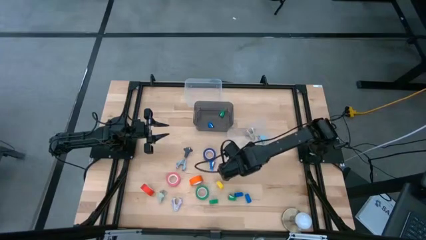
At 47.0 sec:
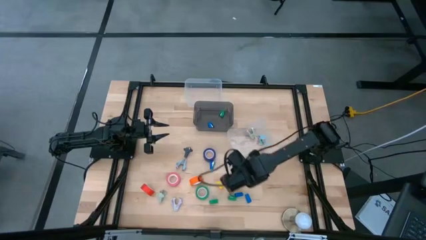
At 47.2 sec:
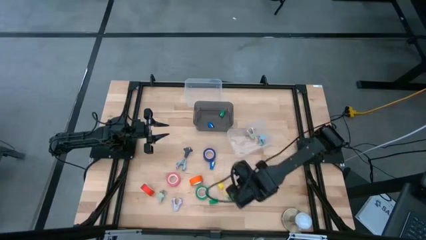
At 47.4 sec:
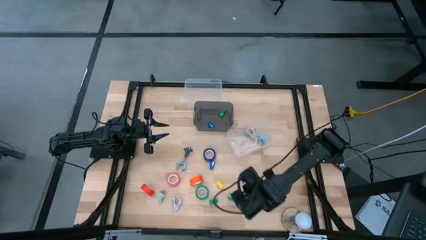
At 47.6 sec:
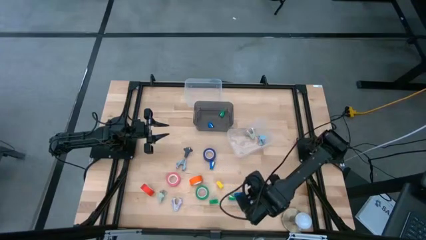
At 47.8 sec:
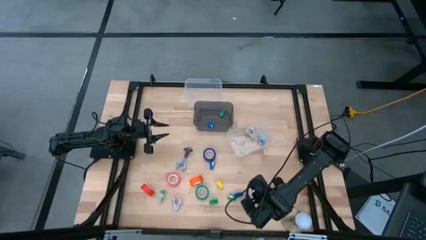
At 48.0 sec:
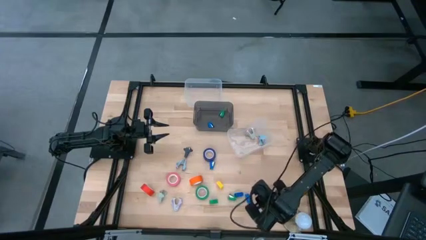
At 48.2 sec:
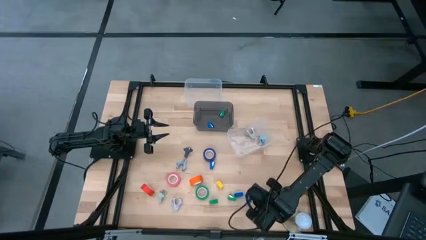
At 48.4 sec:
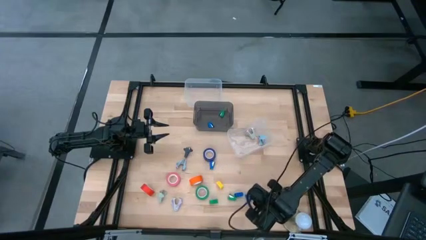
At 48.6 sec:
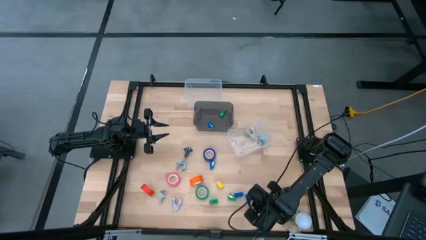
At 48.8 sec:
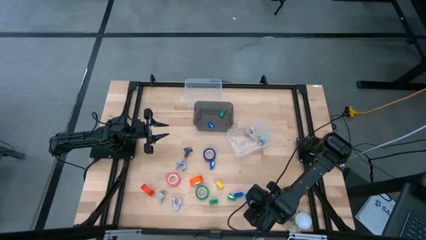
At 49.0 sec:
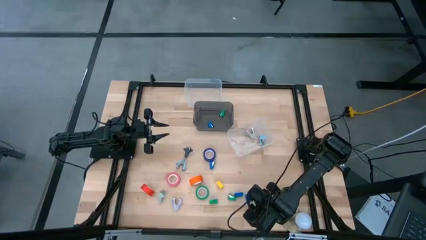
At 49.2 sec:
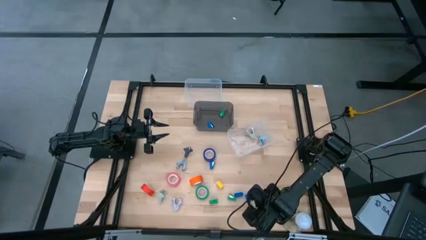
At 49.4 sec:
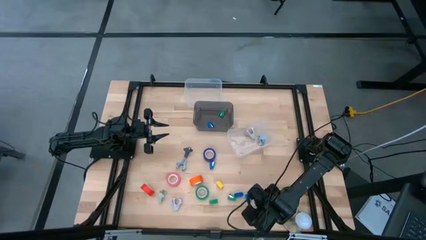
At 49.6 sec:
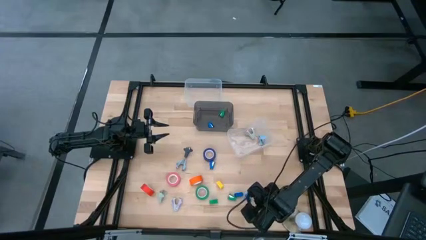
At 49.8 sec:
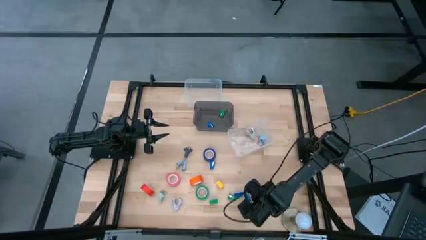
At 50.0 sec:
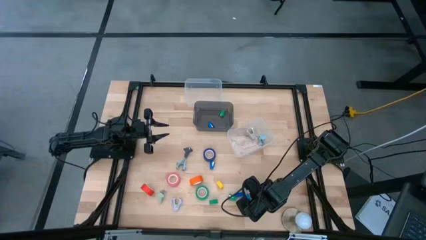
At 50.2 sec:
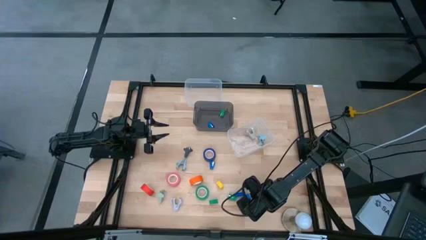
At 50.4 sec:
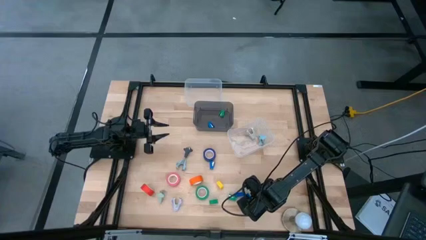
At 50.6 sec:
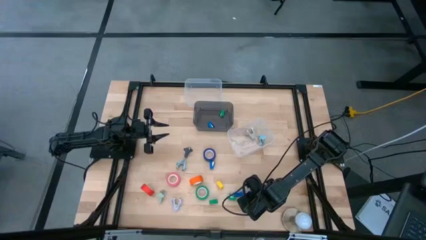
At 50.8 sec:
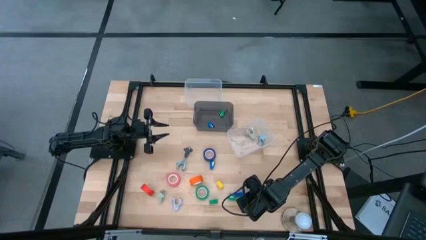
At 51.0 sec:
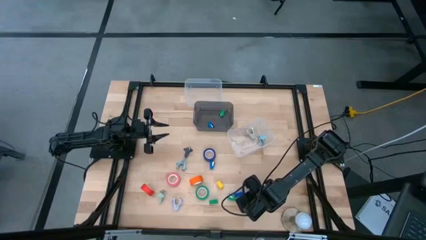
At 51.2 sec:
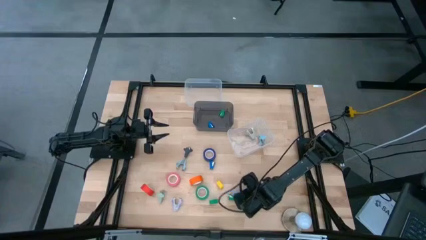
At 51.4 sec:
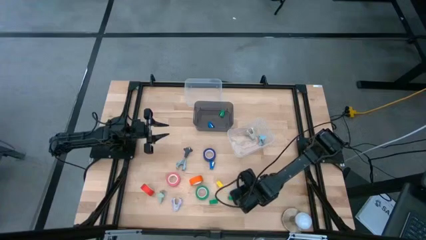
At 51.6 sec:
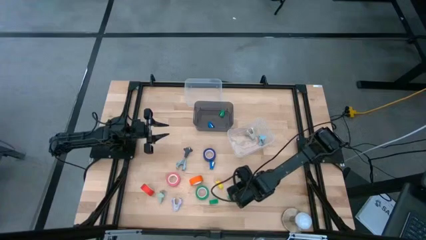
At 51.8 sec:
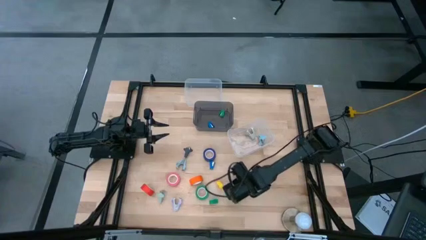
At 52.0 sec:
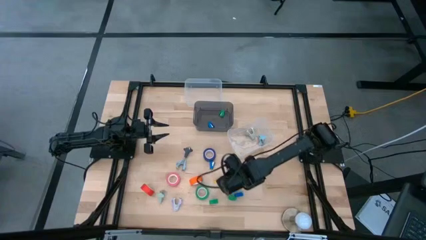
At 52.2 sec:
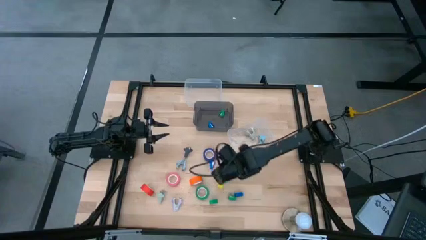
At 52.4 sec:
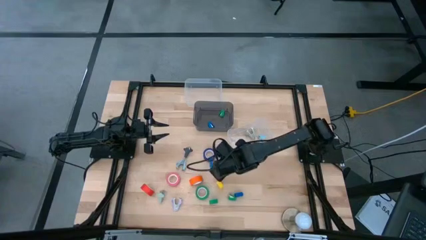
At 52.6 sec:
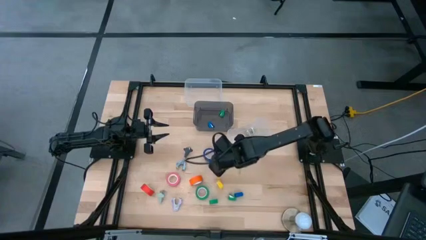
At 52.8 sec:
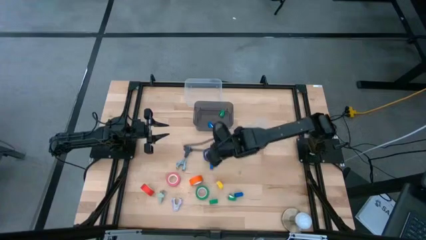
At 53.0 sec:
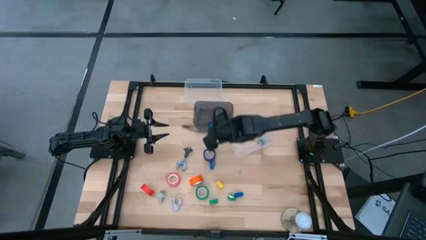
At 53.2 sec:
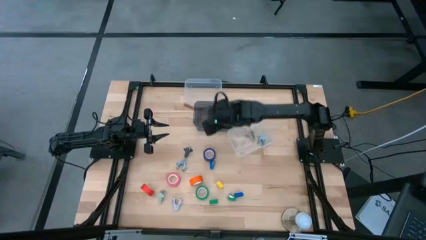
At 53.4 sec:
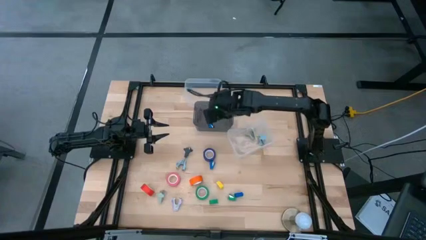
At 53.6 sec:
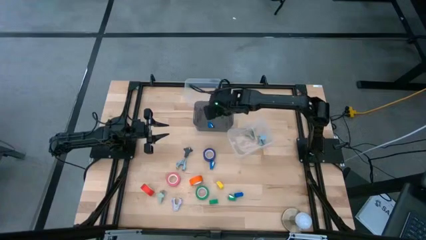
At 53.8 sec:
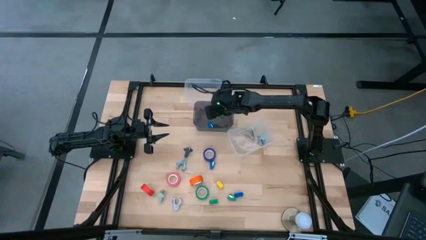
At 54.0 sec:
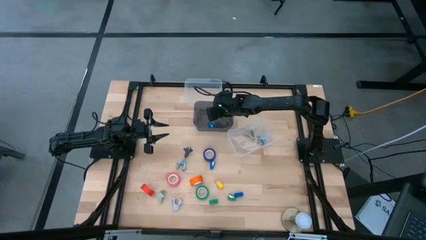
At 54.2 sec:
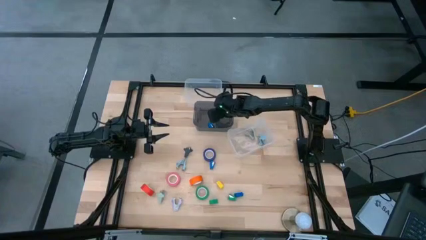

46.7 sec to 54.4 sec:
Task: Pick and place Stapler, Stapler remover, tape
Put the blue stapler into the black bin

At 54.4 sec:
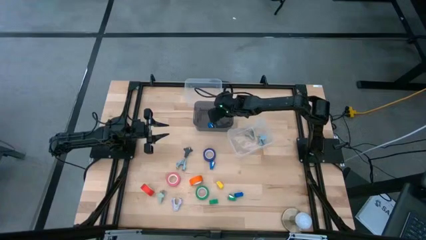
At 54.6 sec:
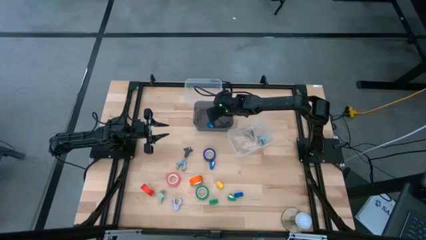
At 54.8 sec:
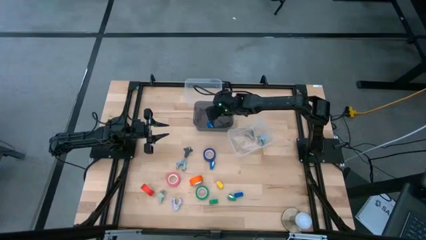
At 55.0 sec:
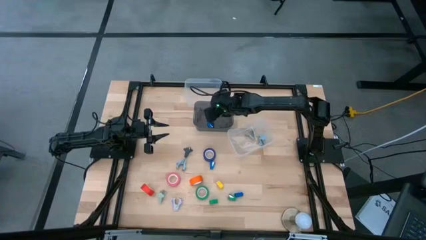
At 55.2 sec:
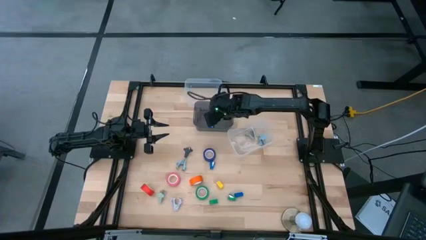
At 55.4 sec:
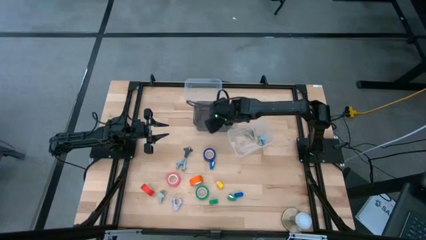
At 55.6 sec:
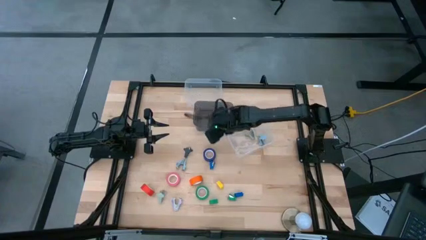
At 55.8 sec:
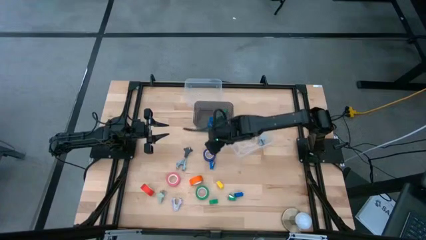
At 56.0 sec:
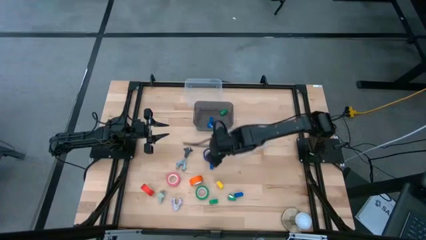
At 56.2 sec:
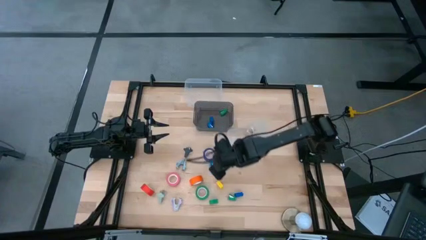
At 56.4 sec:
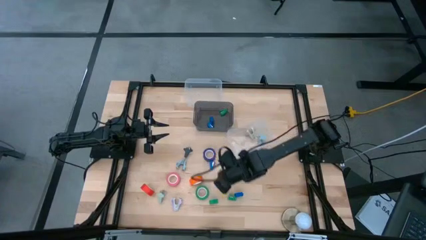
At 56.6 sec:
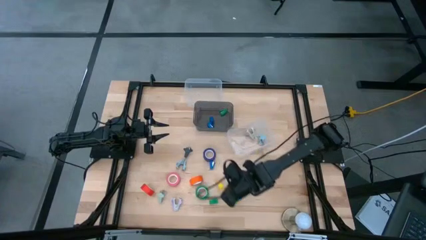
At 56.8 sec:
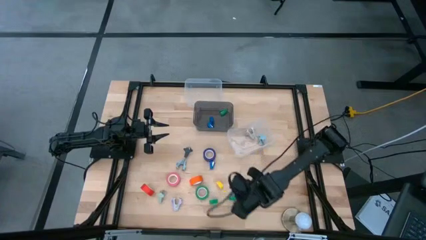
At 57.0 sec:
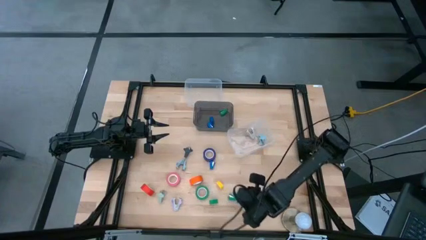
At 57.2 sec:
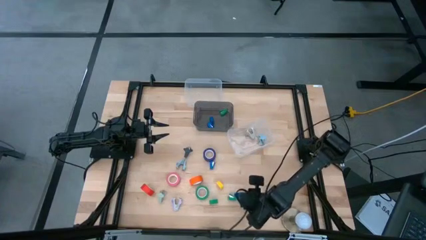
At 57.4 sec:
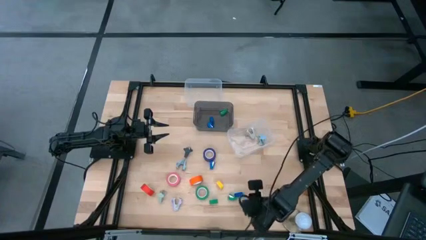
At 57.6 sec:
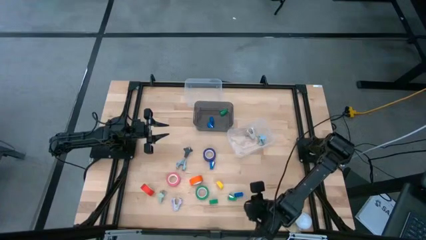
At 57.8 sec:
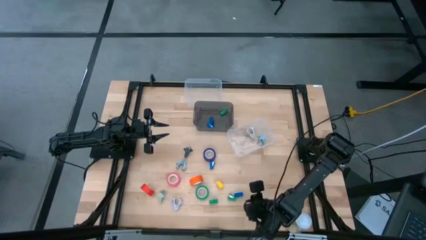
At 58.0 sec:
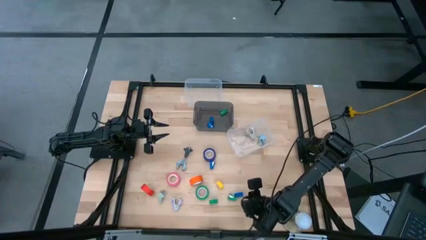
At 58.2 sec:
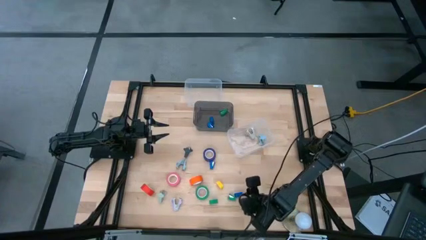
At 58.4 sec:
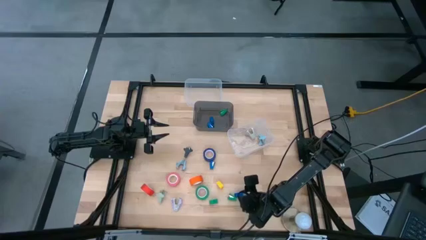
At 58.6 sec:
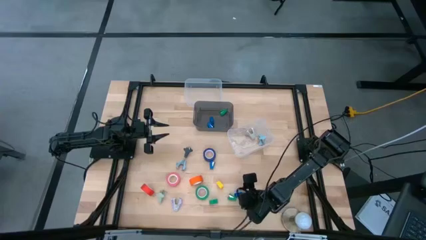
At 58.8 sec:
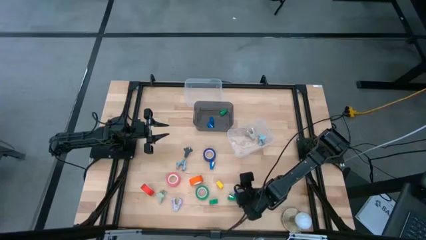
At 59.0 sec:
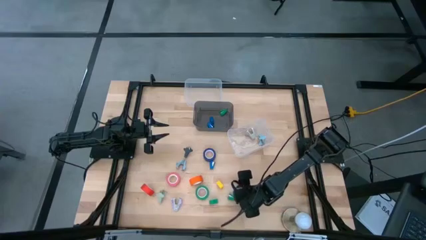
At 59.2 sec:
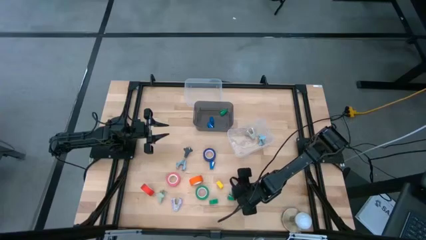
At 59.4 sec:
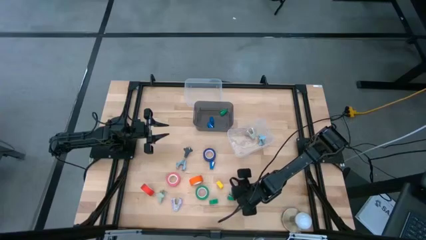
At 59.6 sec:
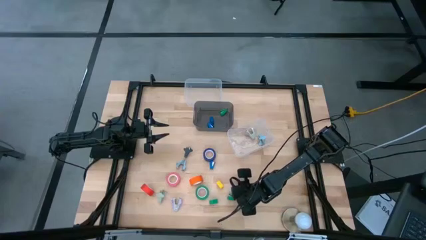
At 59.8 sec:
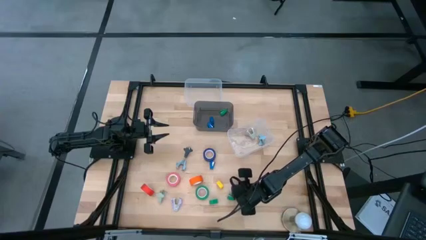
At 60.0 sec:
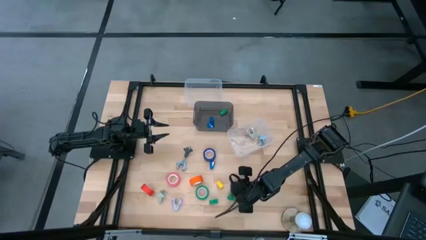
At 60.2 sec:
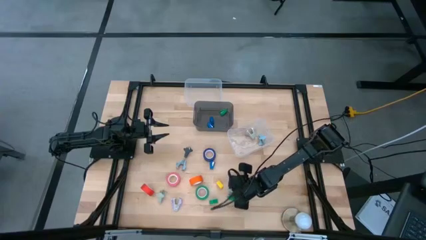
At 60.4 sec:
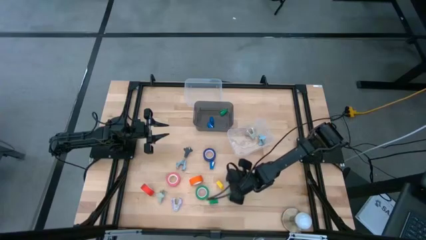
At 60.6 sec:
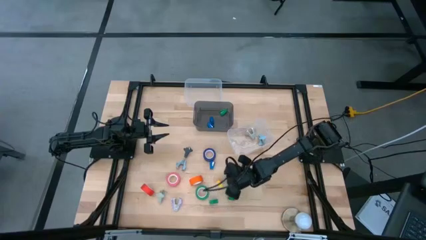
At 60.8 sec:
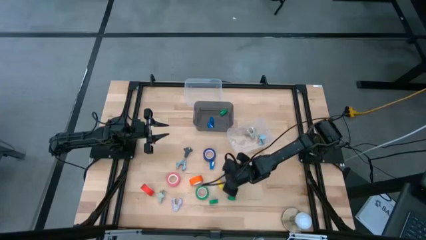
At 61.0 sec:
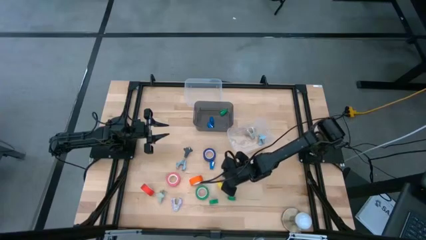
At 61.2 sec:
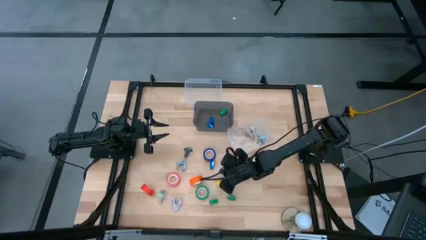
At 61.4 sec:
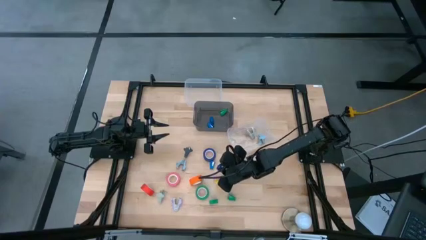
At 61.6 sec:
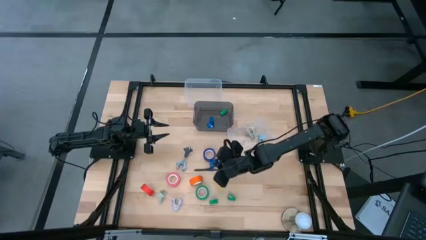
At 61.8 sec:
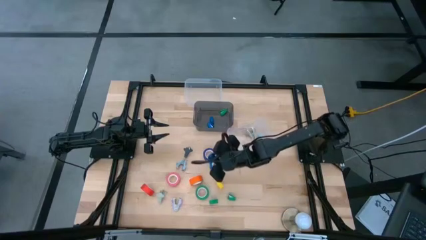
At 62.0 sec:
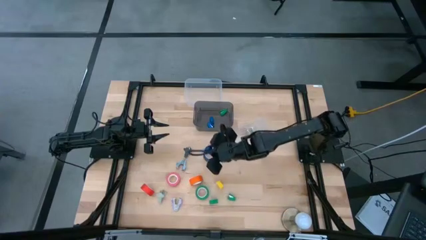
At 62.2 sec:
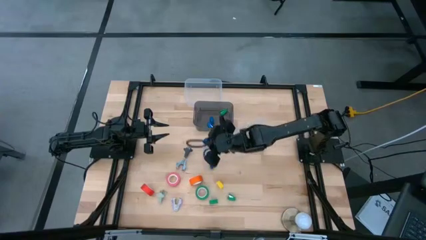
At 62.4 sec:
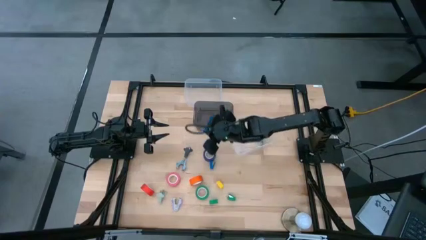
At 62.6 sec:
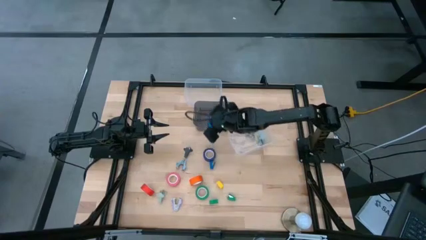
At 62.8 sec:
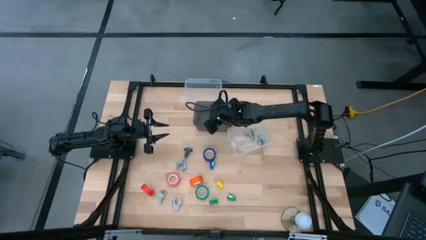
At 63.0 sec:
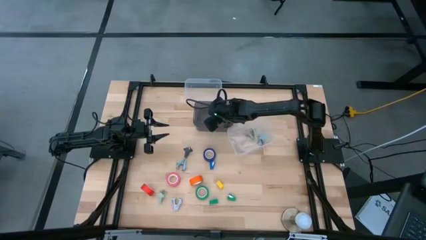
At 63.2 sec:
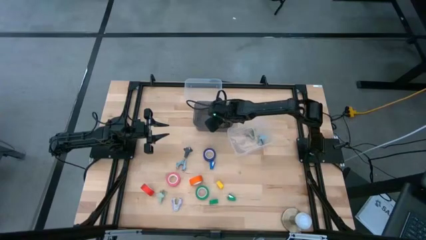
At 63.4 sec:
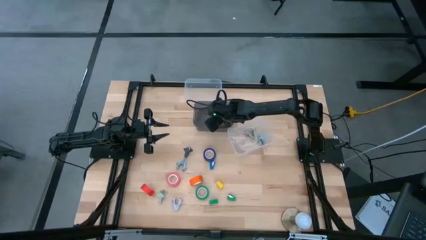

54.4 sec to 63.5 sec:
Put the blue stapler into the black bin
